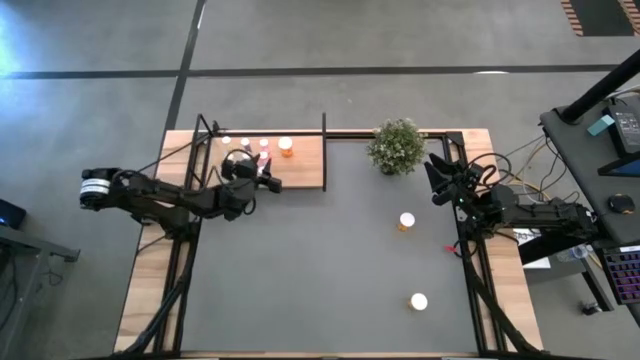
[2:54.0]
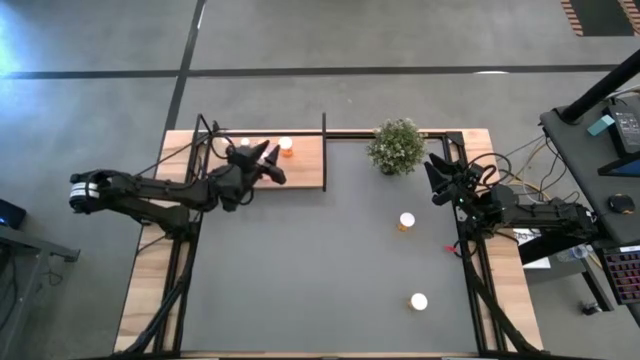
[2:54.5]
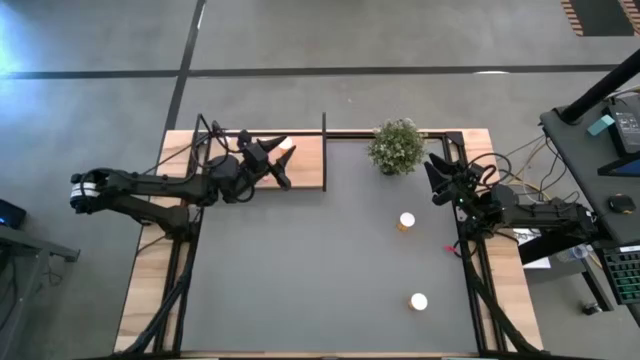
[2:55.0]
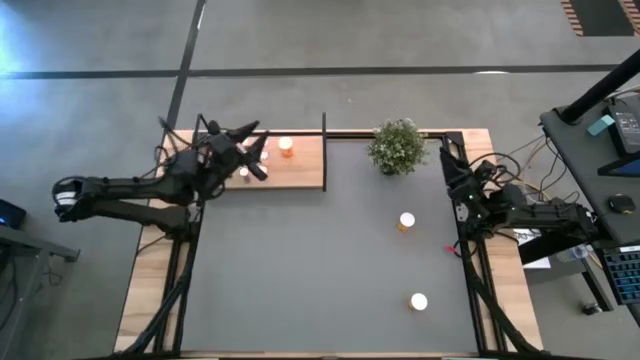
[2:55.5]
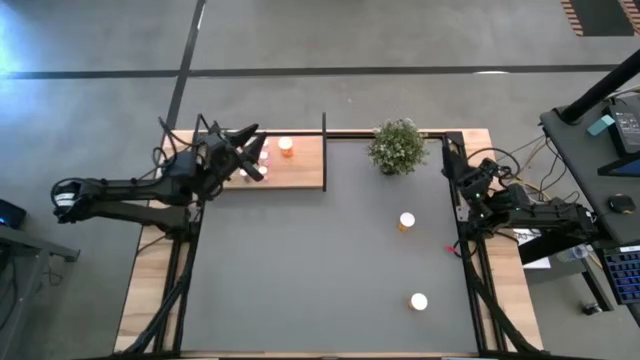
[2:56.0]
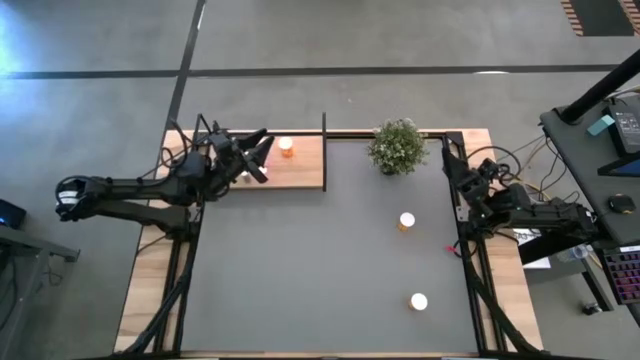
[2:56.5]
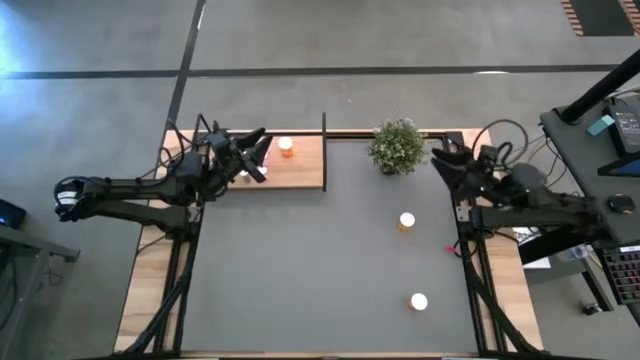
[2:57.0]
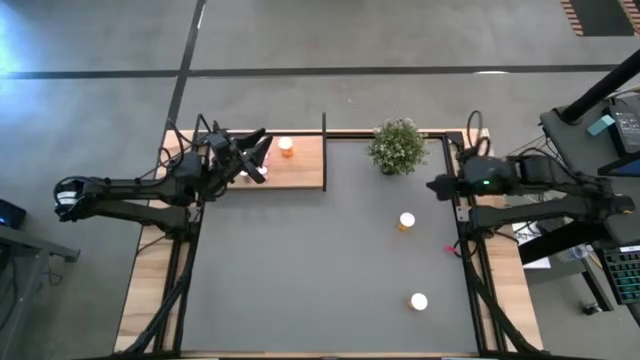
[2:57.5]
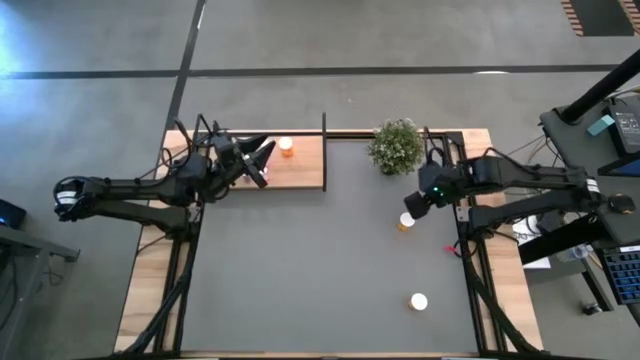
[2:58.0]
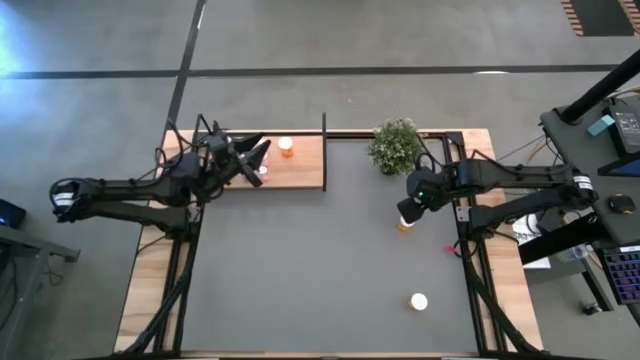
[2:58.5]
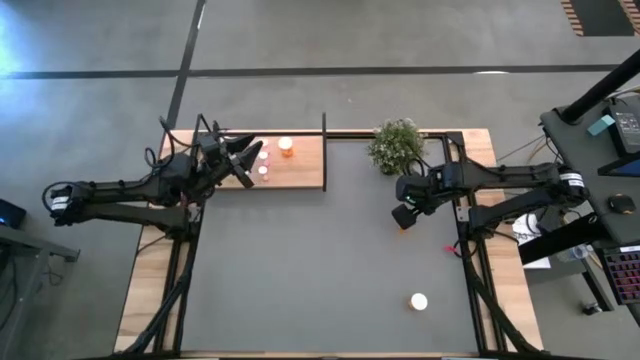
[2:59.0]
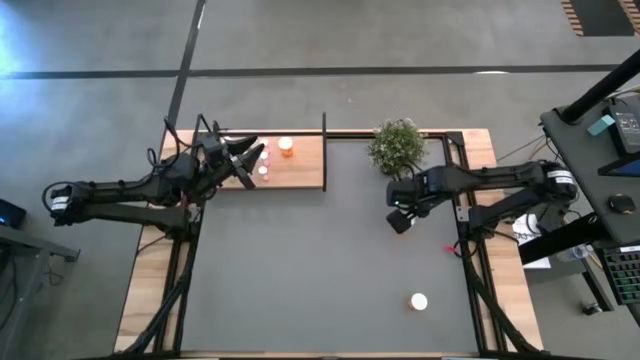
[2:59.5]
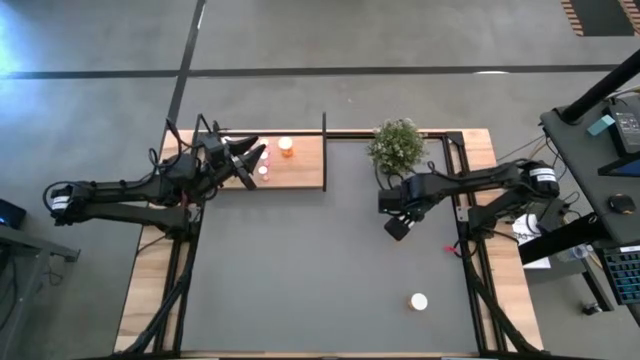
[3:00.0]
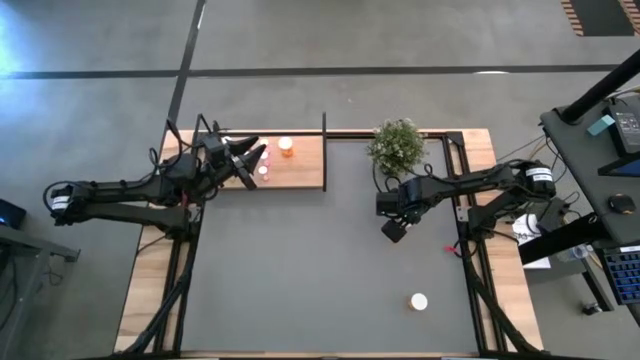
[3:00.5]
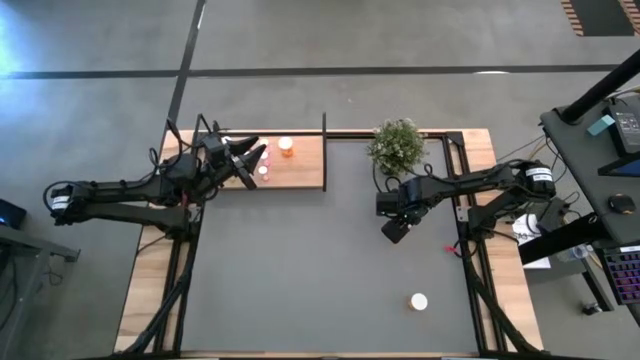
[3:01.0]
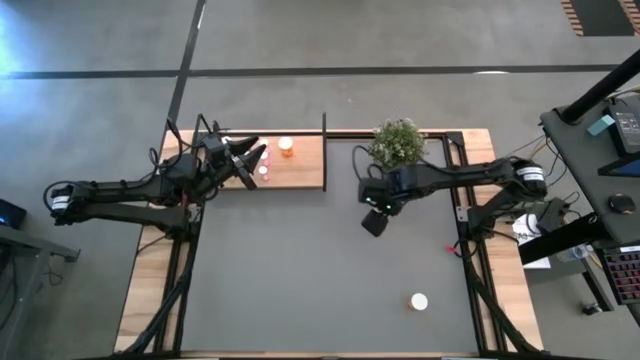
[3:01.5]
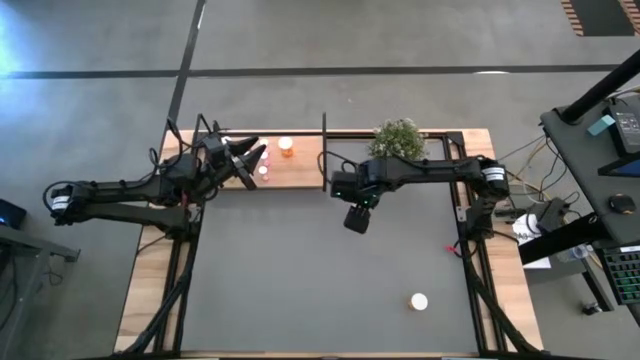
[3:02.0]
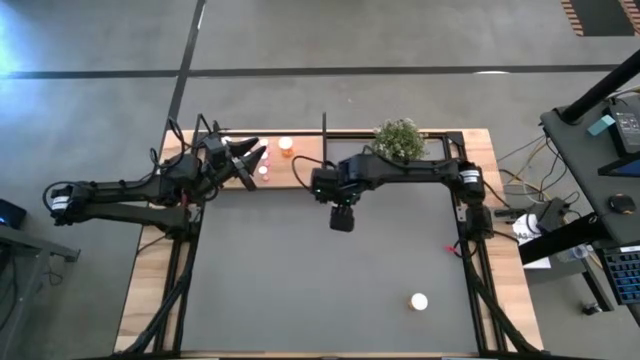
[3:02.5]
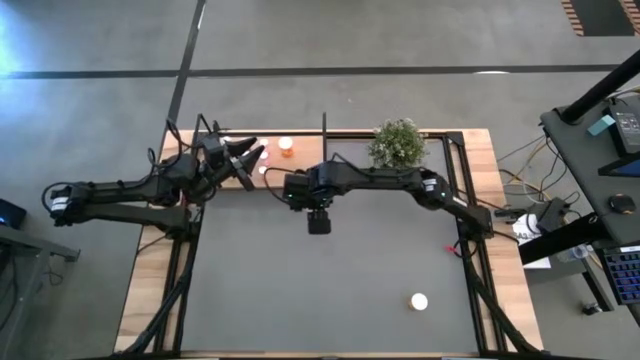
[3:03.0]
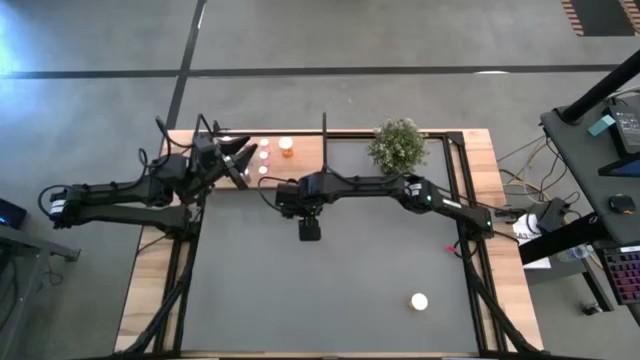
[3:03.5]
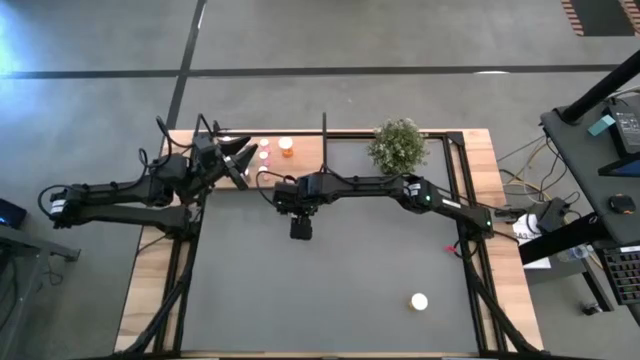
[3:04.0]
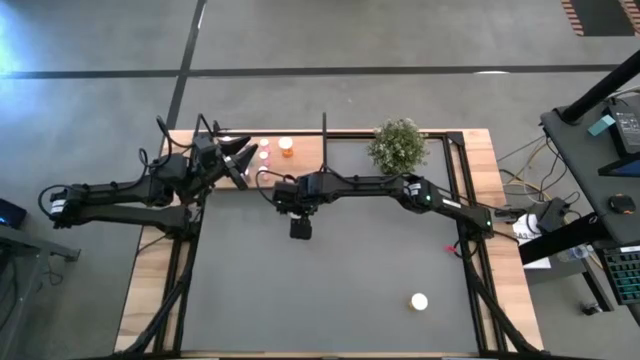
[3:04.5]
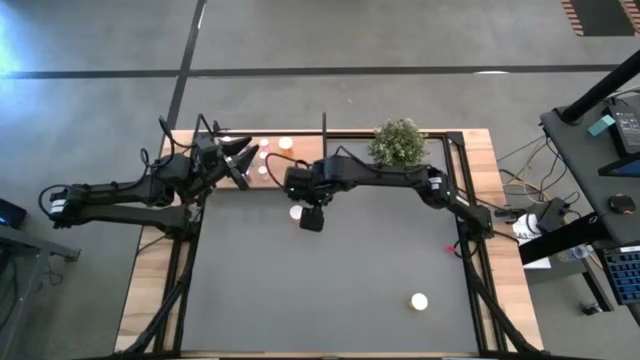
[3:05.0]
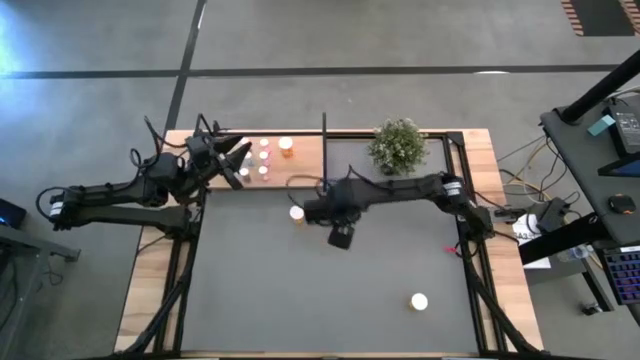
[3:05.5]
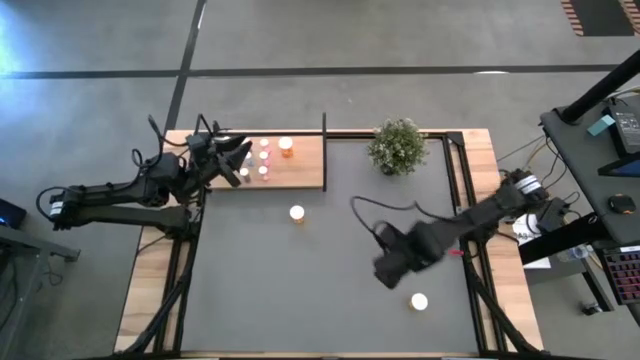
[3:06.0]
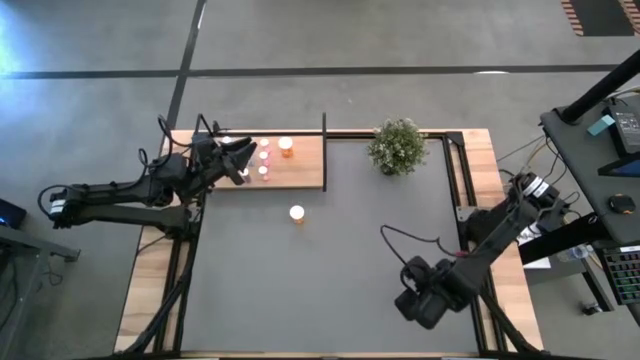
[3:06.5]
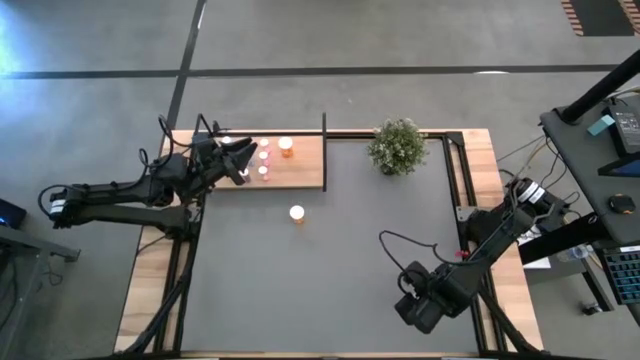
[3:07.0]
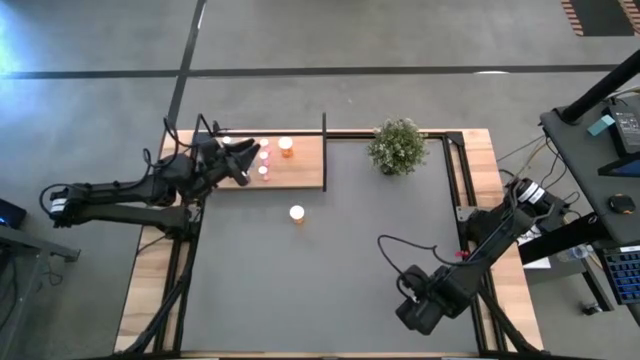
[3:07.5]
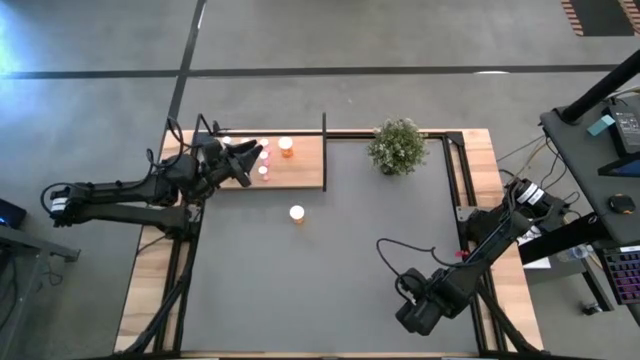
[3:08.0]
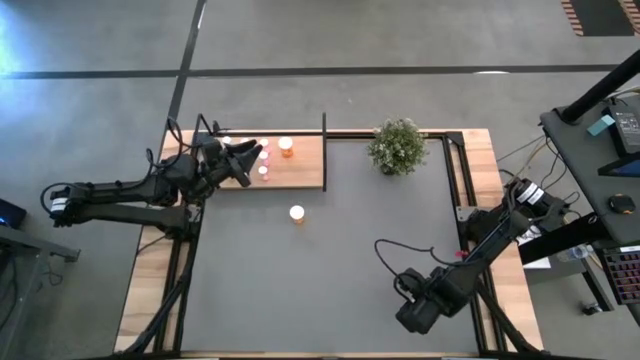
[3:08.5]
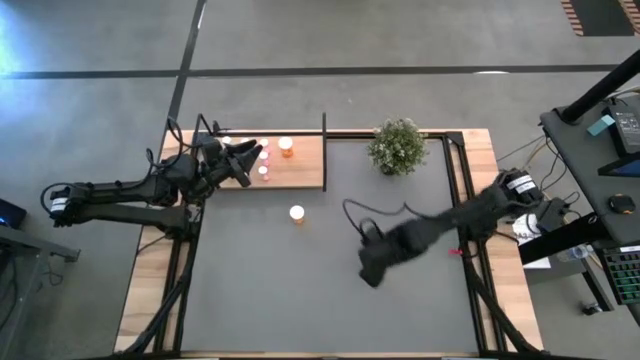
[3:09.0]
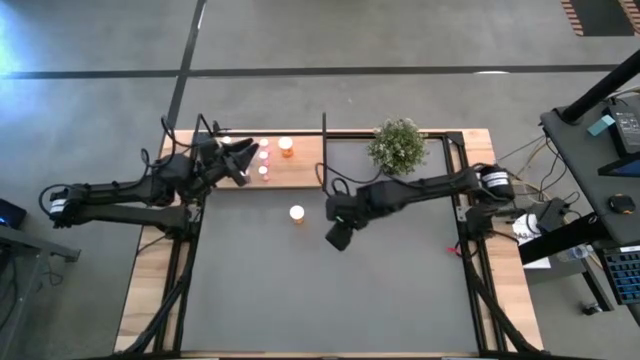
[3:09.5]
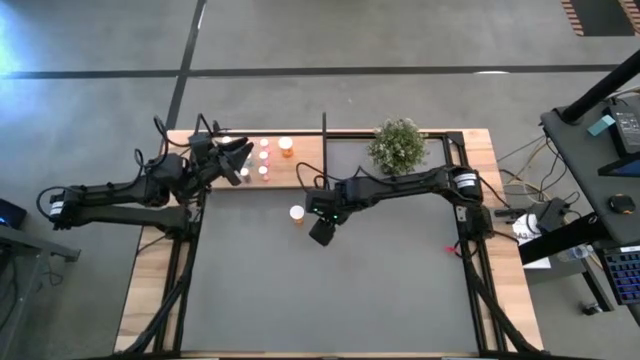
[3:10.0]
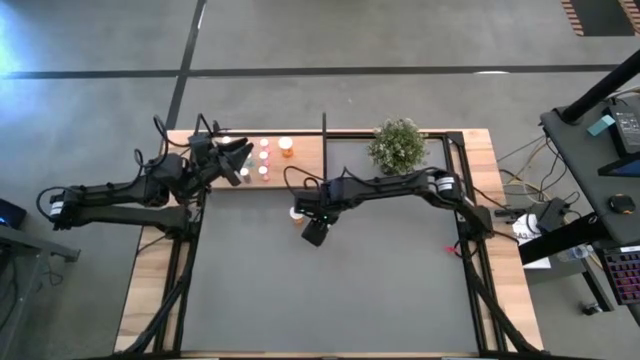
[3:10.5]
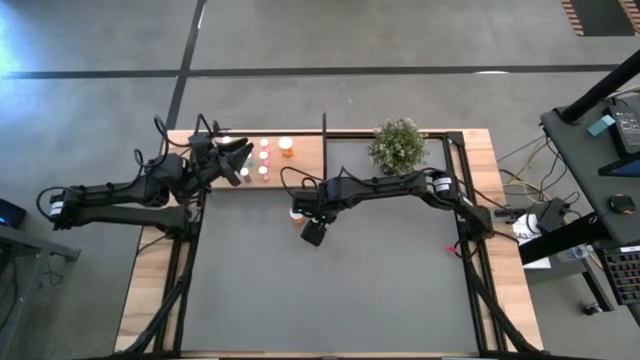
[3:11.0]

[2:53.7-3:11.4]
Task: Pick and place medicine bottles onto shelf by color
Move the orange pill bottles to the center of the table
